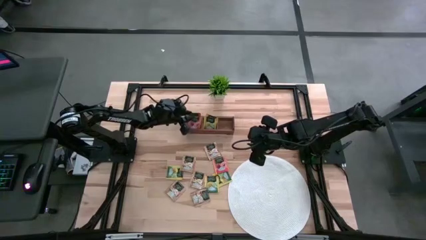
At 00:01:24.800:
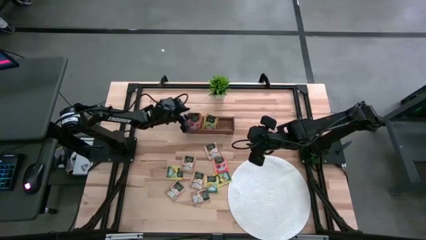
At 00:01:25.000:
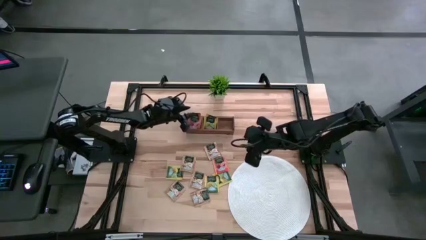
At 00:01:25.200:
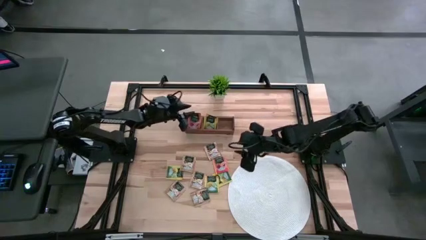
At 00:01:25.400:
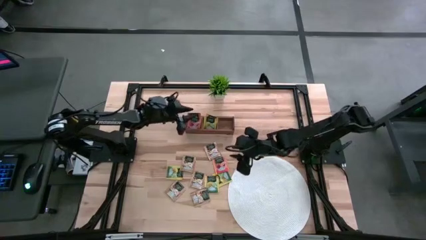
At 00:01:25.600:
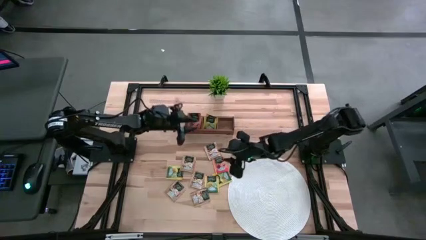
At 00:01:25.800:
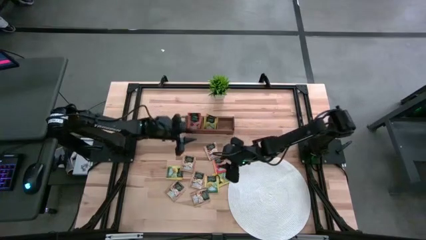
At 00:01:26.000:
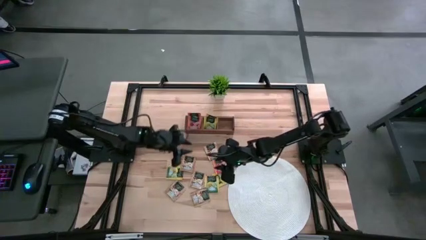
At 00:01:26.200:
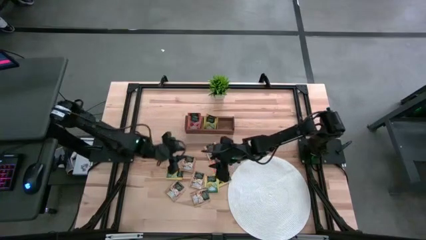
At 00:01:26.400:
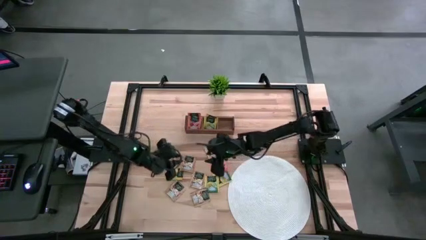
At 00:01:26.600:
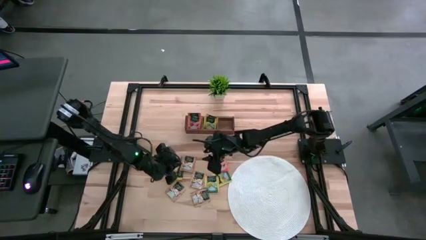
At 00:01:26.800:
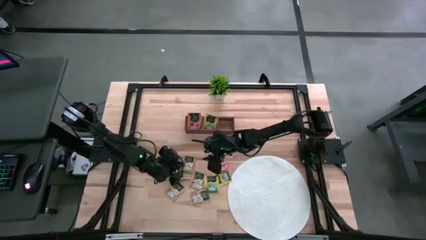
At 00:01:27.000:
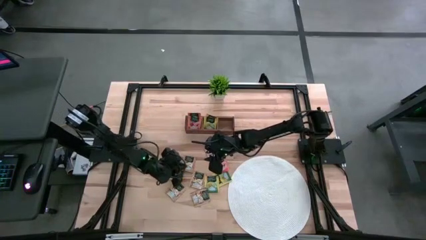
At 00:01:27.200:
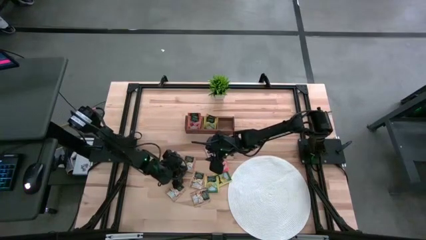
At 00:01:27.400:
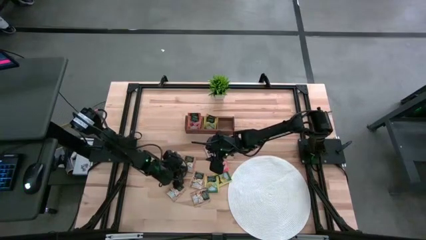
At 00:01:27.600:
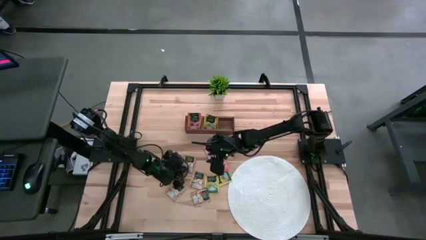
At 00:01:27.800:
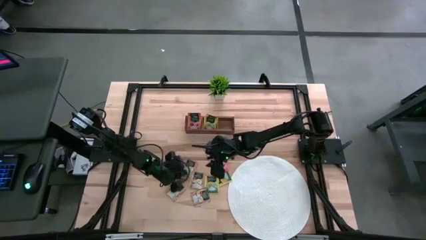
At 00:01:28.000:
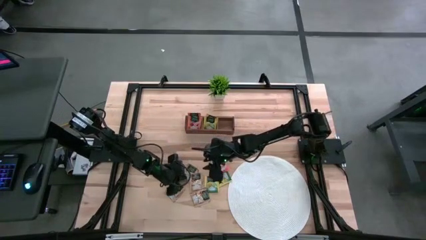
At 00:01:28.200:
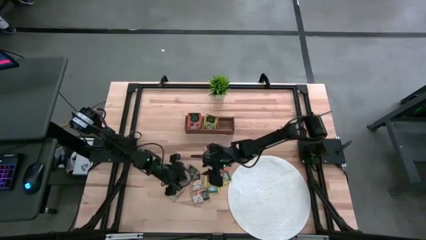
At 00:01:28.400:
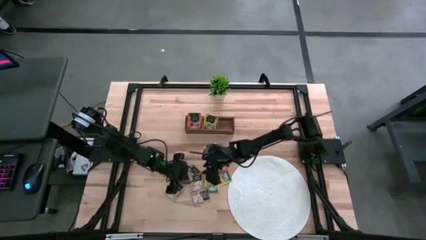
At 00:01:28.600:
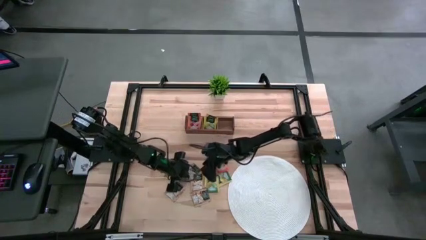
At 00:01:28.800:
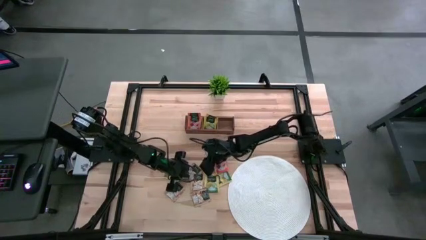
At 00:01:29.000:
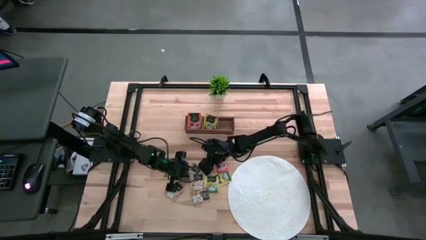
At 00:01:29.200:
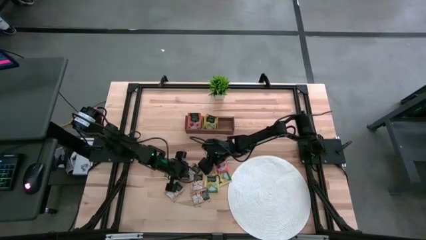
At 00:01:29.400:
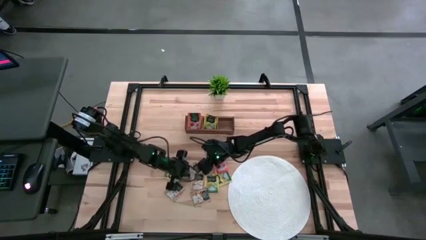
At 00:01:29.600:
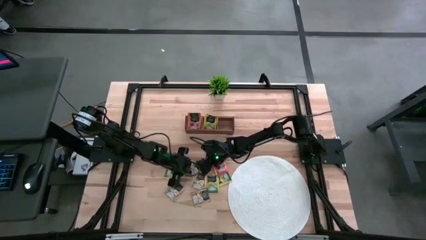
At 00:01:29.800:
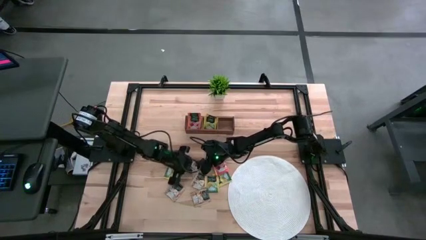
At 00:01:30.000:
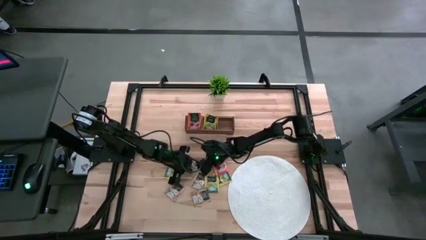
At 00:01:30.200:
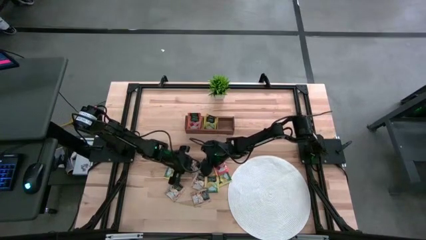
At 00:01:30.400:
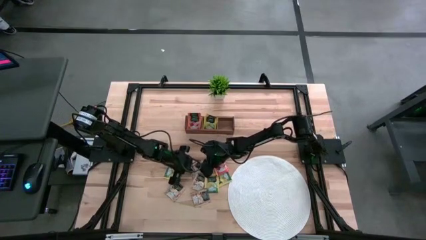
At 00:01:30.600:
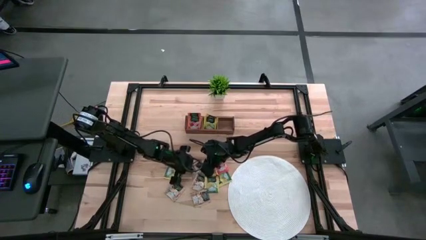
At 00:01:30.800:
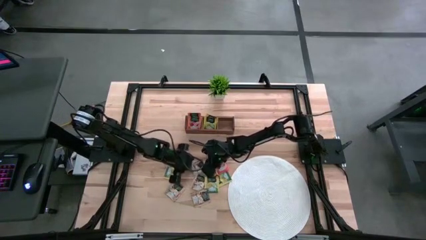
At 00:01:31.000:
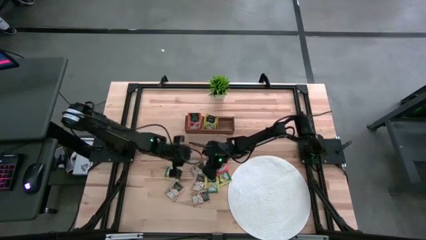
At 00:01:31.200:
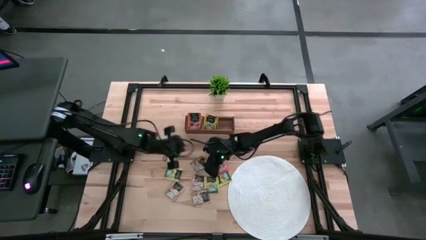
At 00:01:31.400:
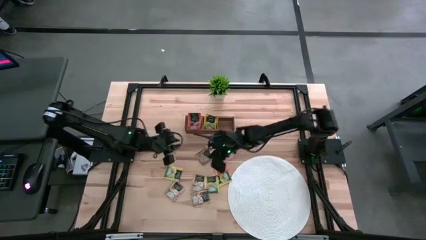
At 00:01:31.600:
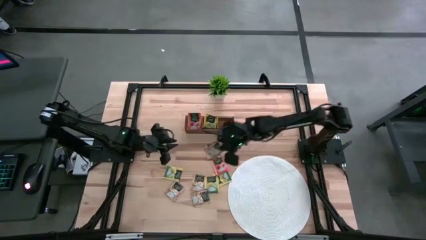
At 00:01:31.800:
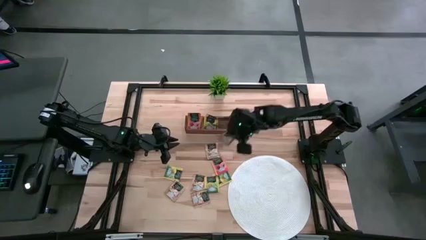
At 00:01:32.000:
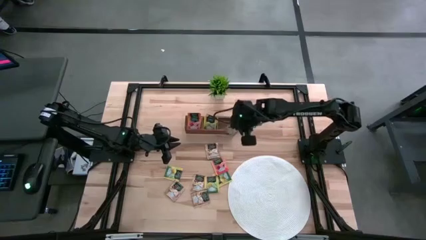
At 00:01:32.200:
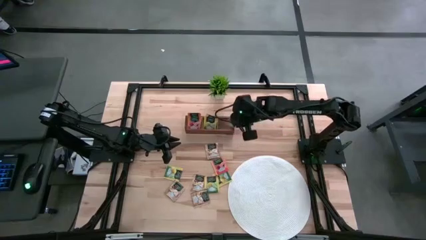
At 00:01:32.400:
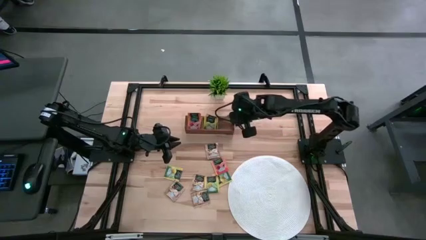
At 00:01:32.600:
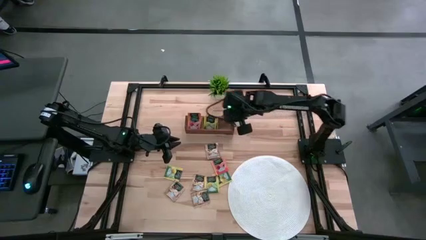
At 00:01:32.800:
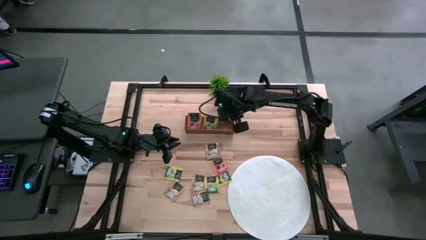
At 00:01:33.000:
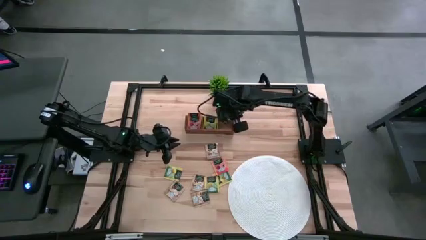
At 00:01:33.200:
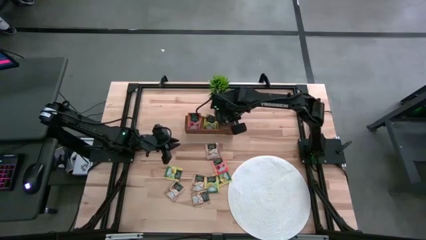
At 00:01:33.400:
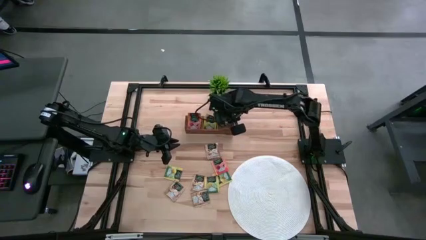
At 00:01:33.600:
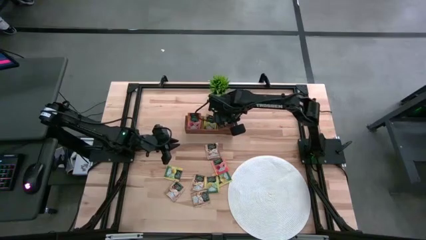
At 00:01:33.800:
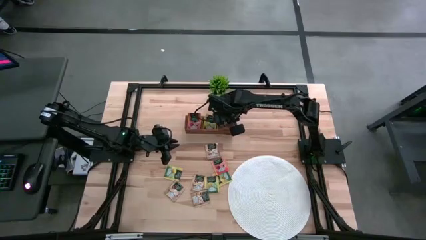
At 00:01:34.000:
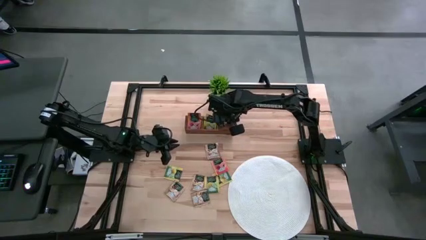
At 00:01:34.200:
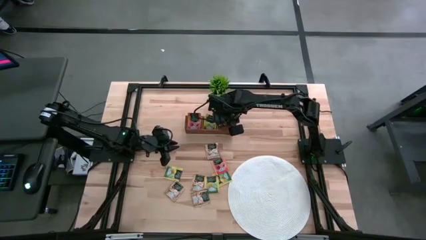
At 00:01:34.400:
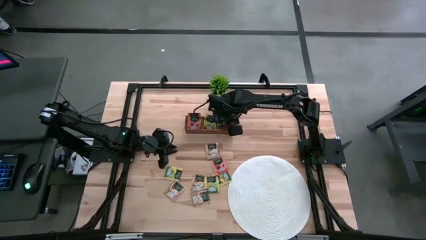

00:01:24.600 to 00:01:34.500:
Task: Pick & Place Tea
Put the brown tea bag into the right section of the wooden organizer

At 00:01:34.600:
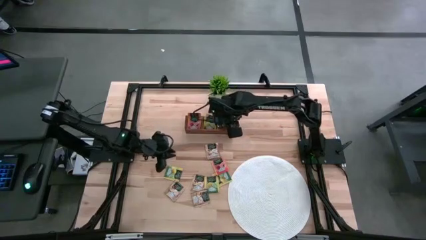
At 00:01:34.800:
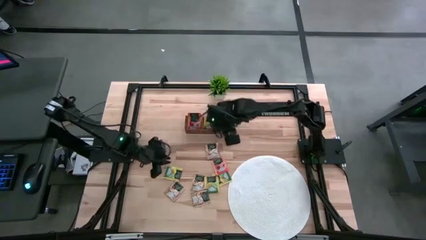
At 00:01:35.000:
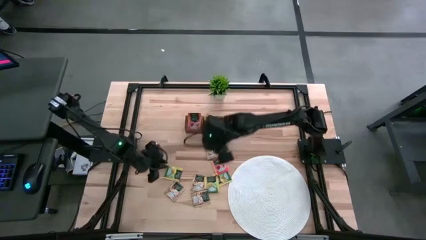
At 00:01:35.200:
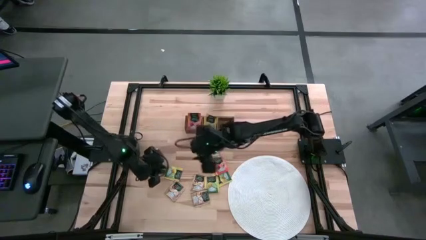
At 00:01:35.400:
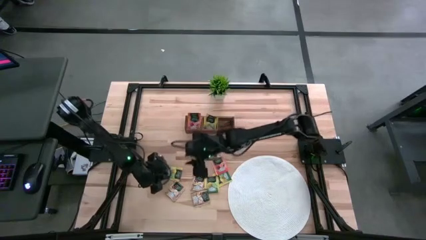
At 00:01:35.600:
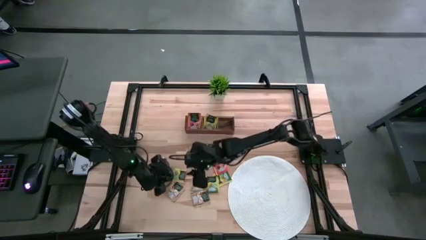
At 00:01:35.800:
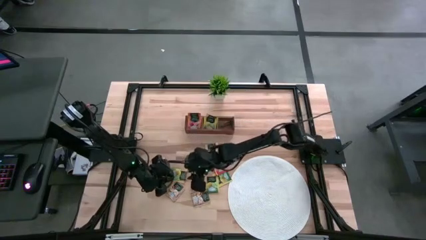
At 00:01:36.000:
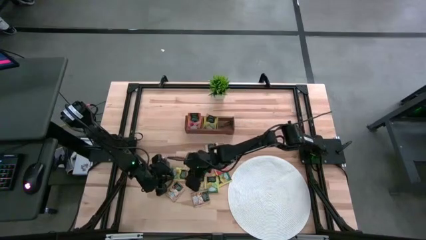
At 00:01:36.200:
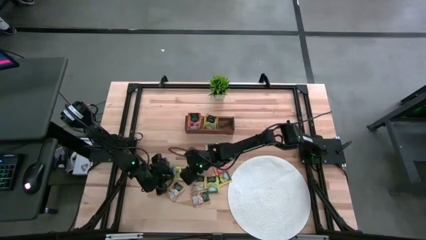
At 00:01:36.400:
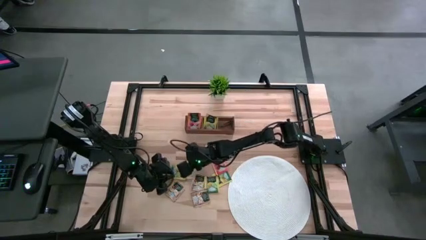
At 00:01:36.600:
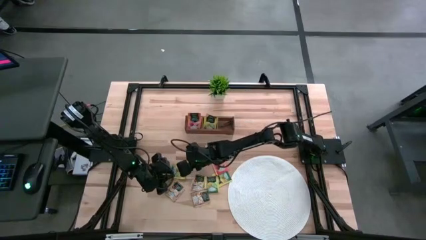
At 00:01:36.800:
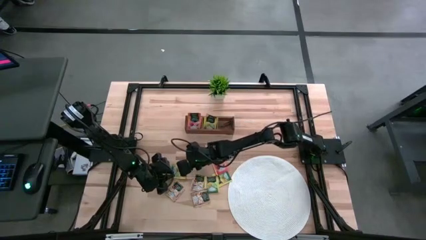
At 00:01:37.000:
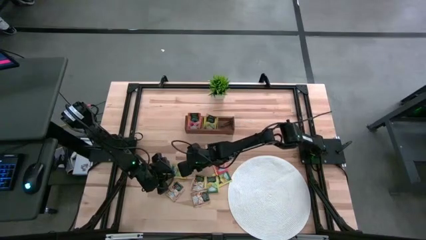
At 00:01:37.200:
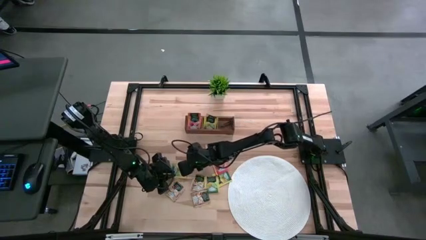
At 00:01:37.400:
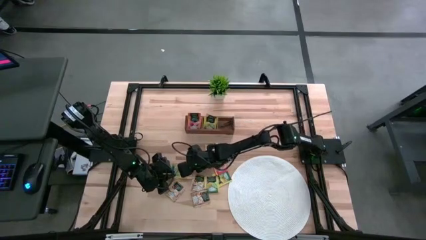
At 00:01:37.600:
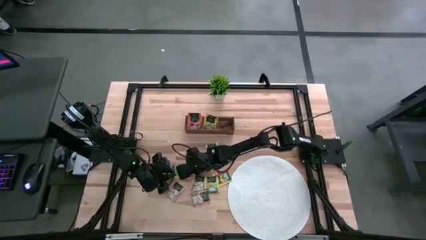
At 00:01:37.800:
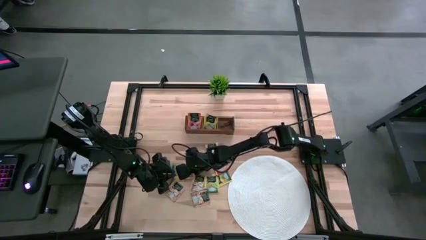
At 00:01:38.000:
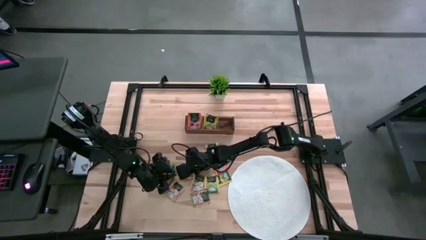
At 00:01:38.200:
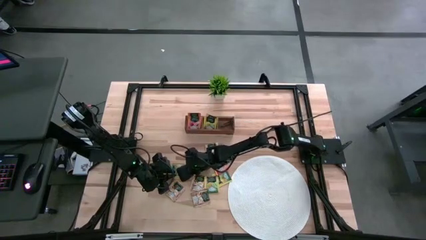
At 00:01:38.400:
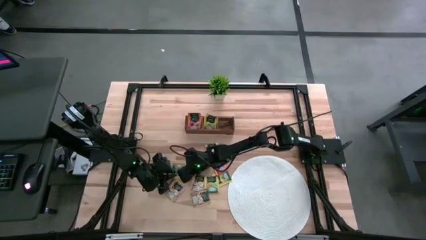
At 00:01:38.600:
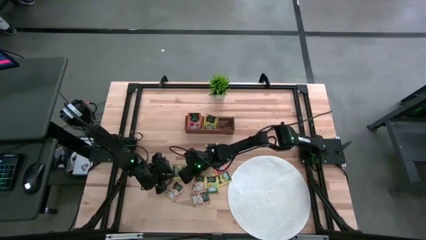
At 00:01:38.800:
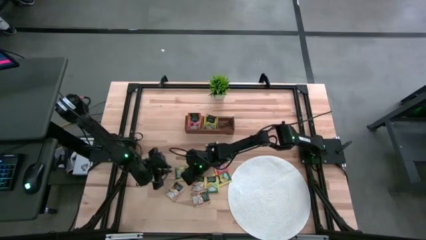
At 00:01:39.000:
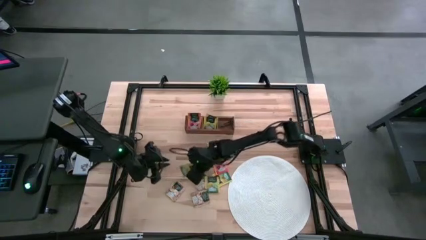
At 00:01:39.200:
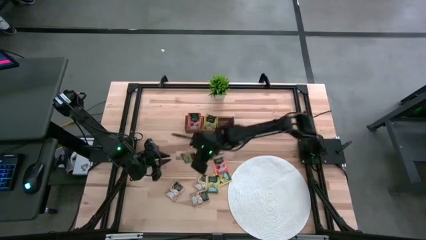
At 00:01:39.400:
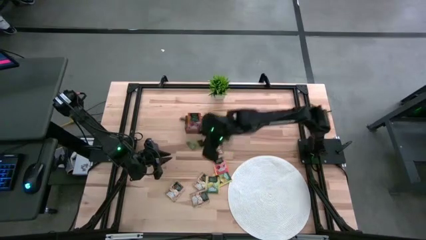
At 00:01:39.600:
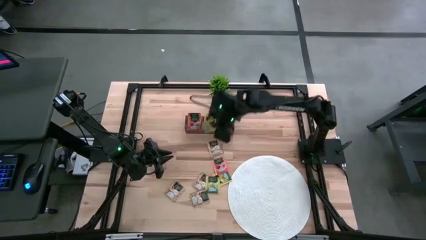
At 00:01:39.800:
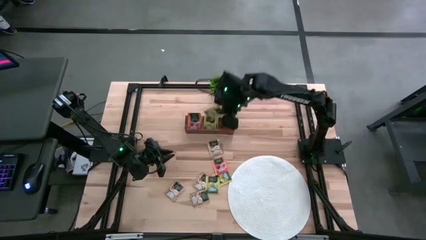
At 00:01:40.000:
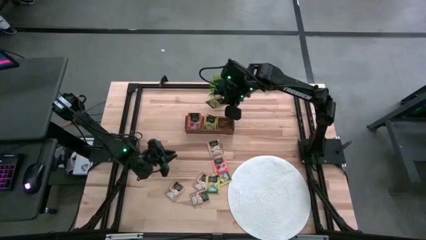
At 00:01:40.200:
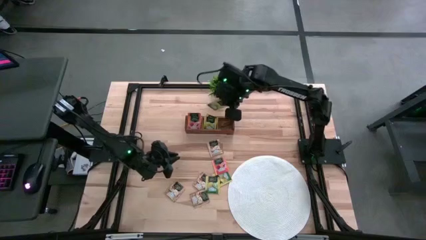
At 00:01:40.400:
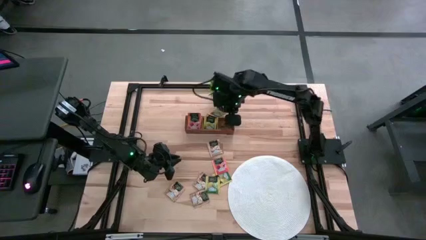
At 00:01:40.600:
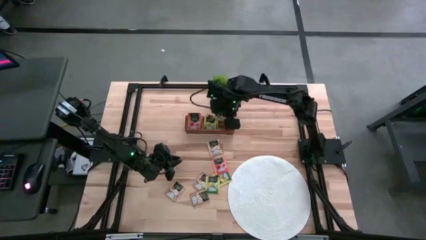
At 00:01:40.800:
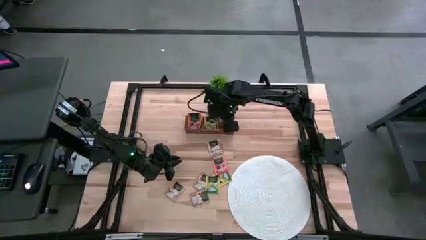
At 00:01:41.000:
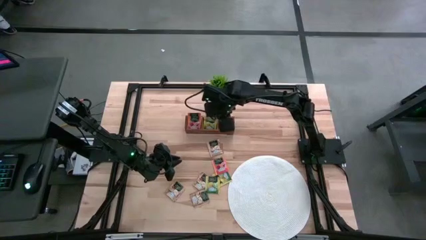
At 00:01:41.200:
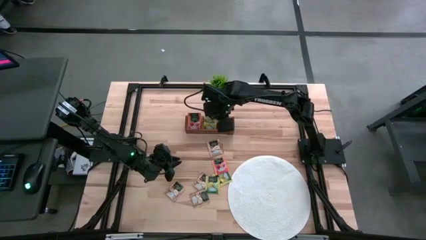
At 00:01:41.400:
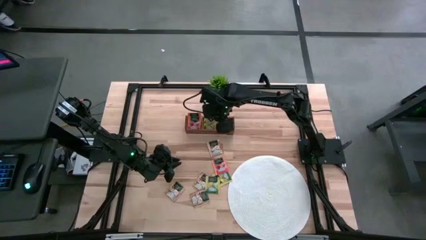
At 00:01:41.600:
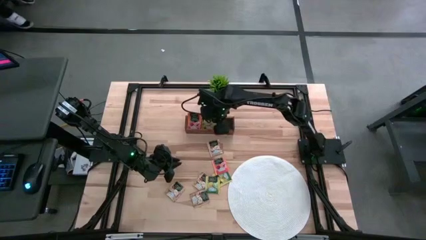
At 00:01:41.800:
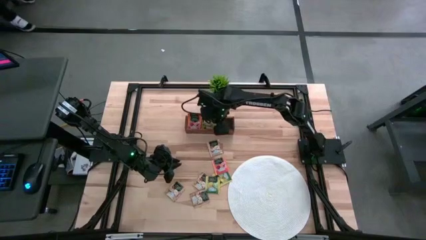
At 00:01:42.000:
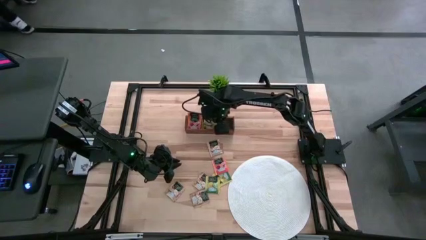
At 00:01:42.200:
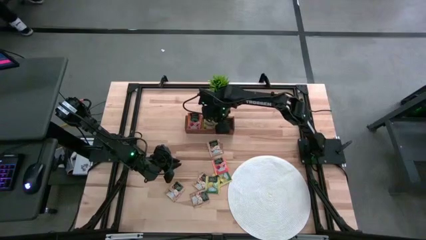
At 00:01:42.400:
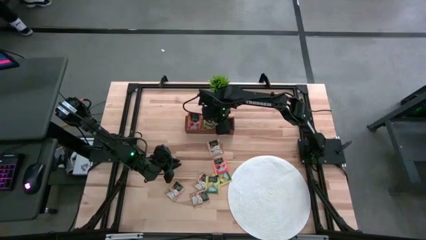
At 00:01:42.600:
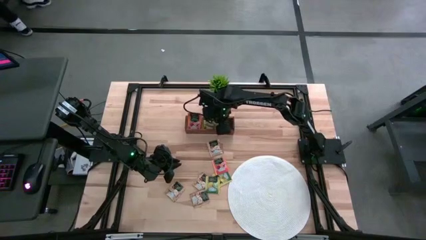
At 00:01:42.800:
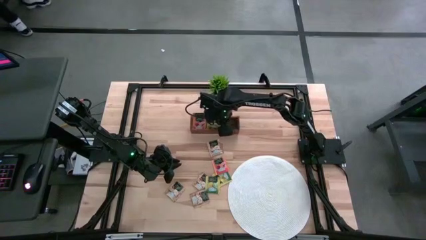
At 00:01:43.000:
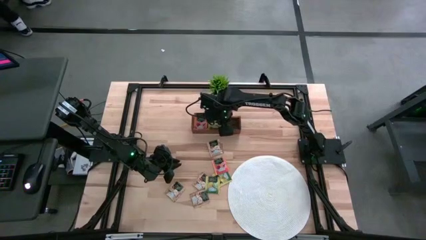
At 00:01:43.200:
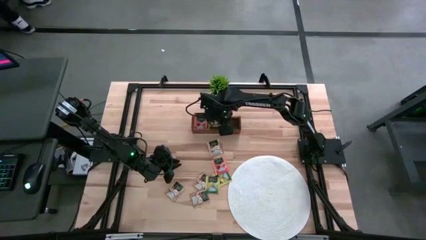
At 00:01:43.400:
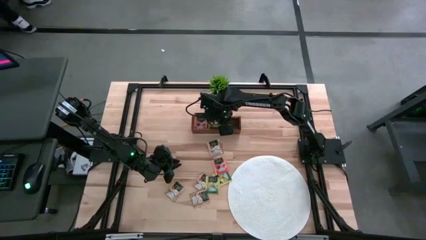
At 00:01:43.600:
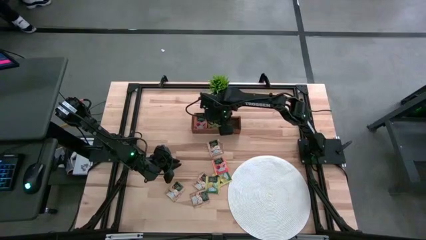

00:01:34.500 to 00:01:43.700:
Put the yellow tea bag into the middle section of the wooden organizer
